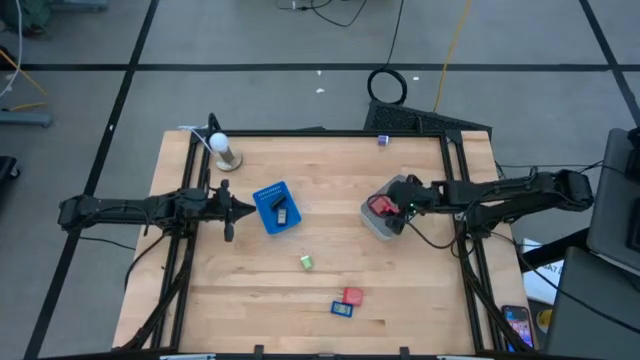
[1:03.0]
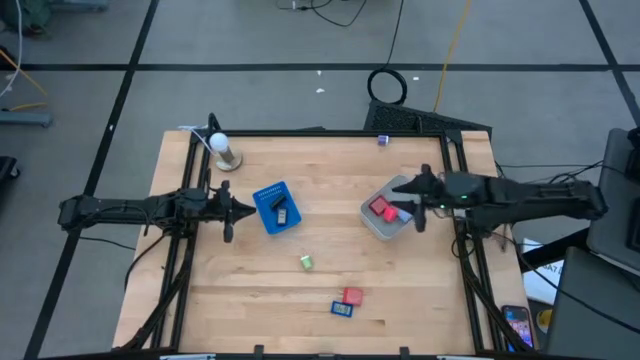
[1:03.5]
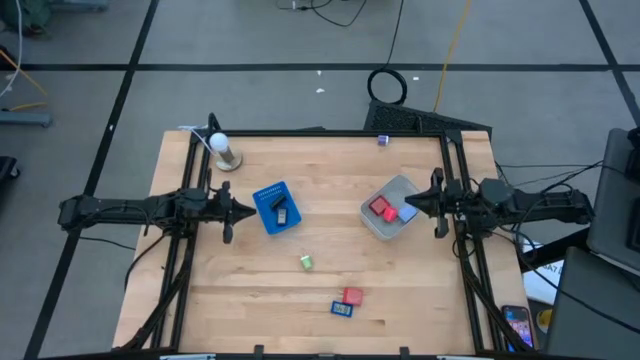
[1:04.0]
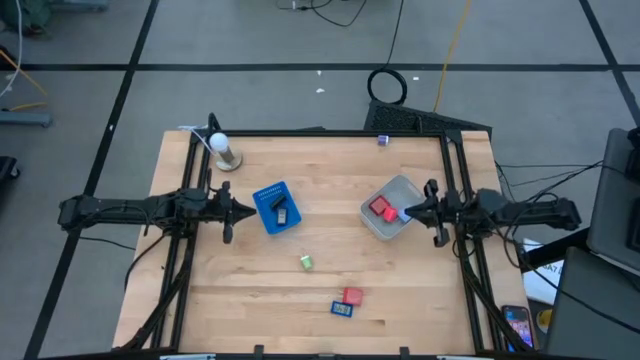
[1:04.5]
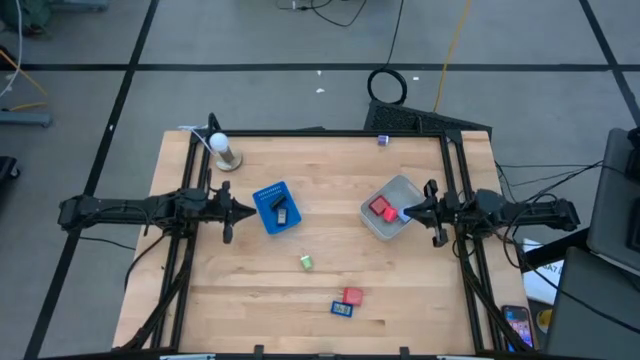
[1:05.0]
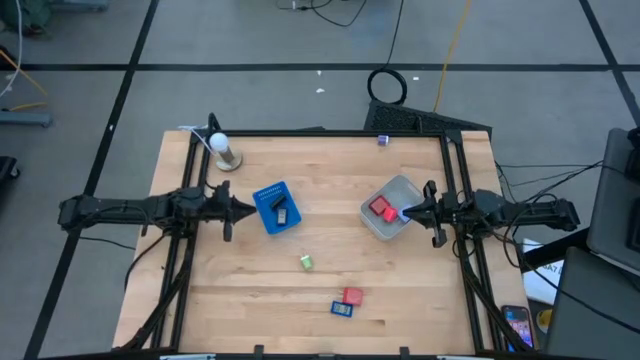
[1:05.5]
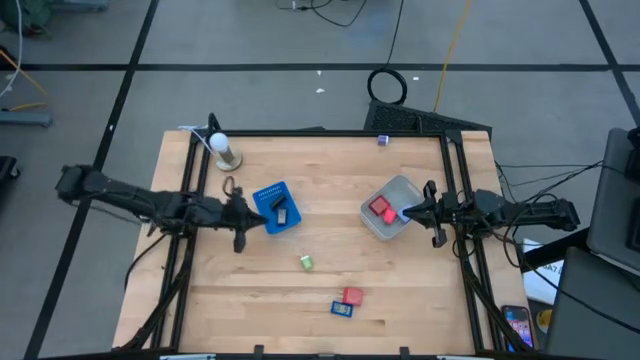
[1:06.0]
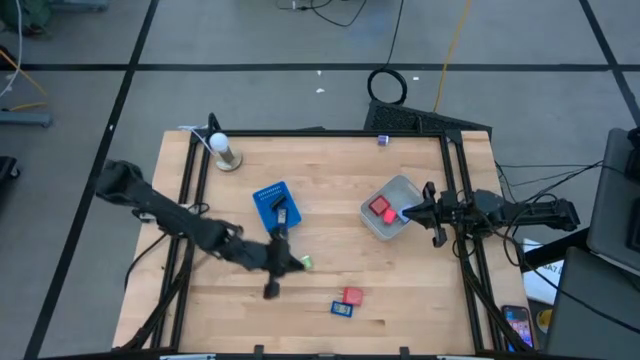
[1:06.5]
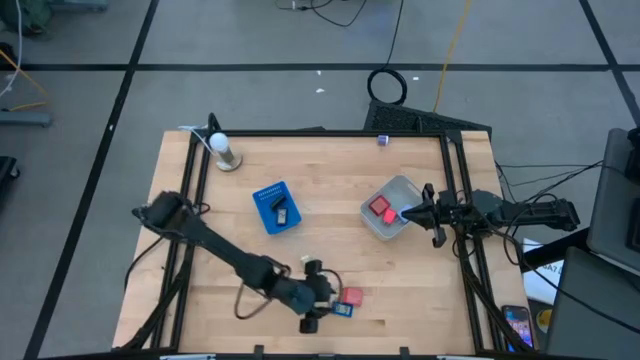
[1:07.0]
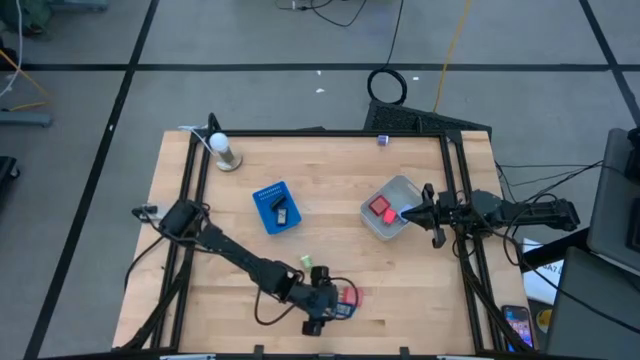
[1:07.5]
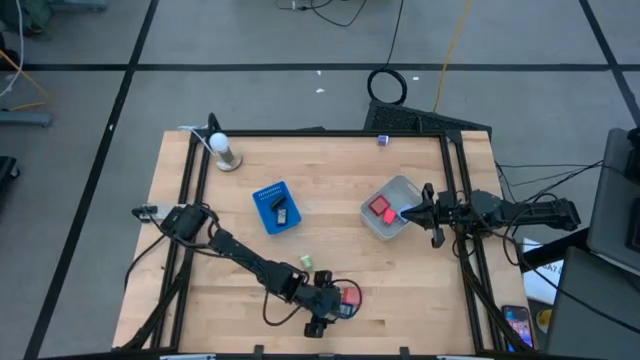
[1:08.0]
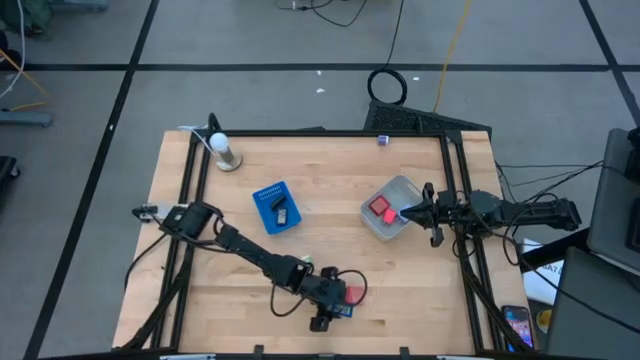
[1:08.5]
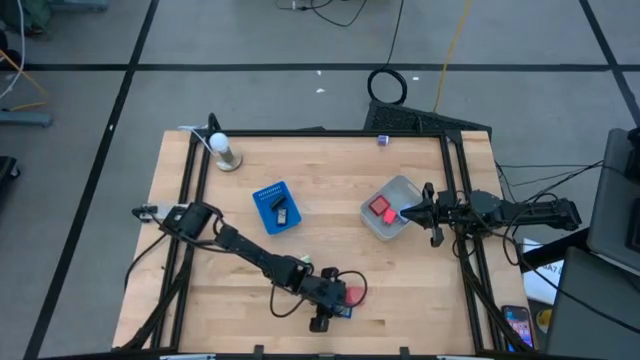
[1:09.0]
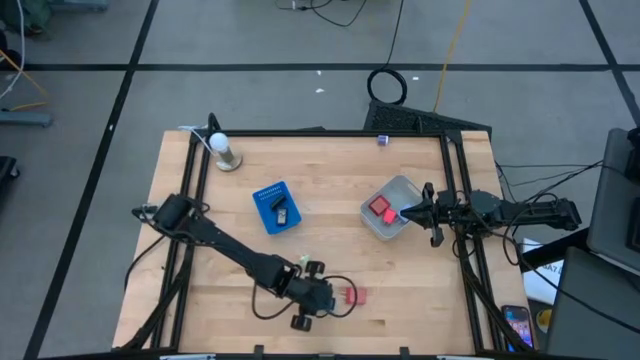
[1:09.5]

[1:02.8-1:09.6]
Task: Pick & Place Office items
Put the blue digital timer into the blue bin

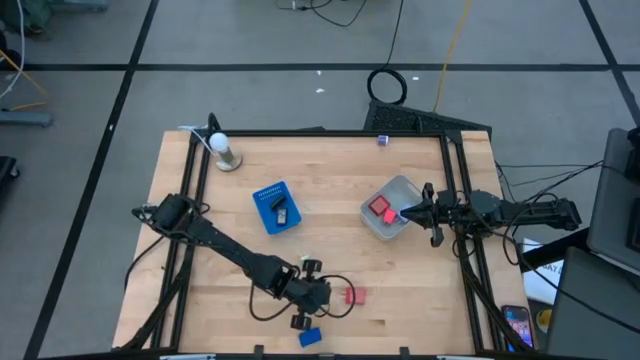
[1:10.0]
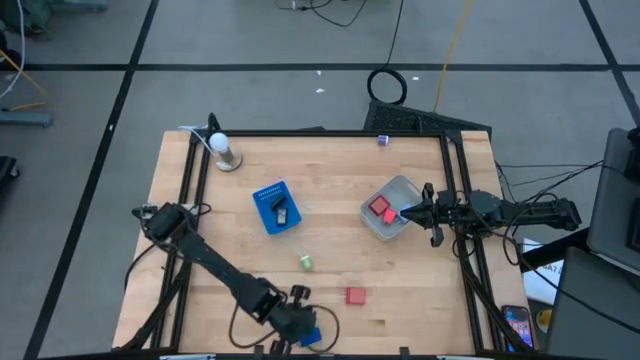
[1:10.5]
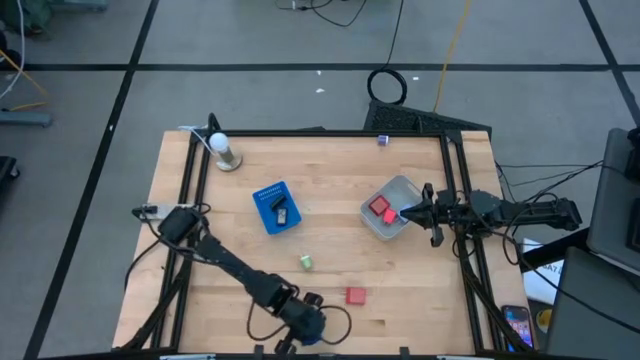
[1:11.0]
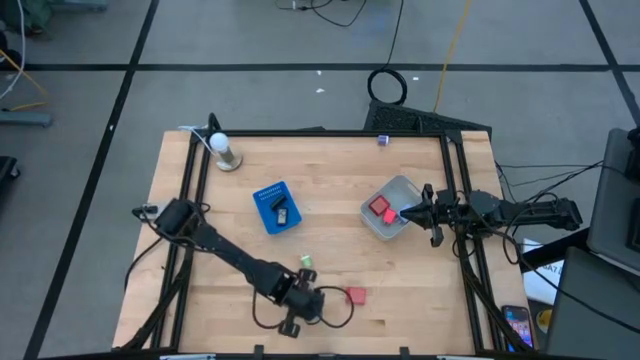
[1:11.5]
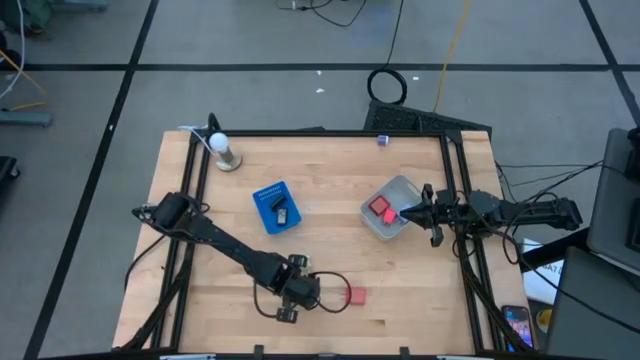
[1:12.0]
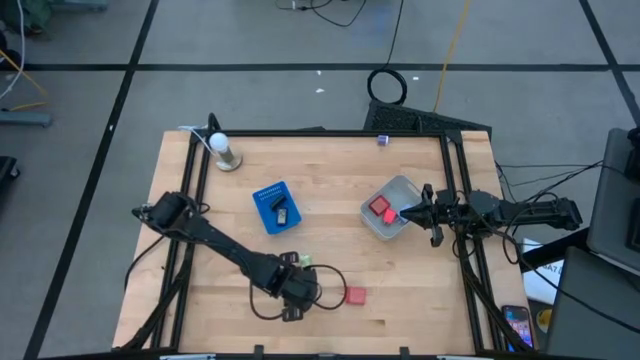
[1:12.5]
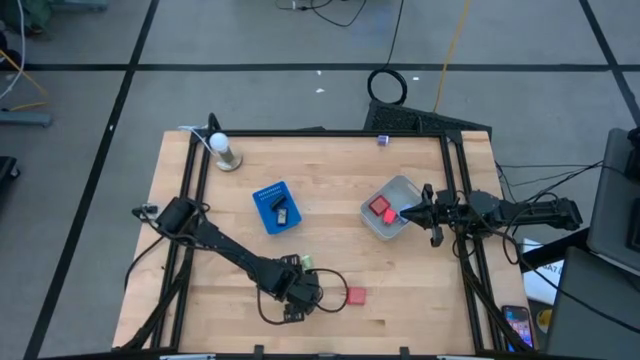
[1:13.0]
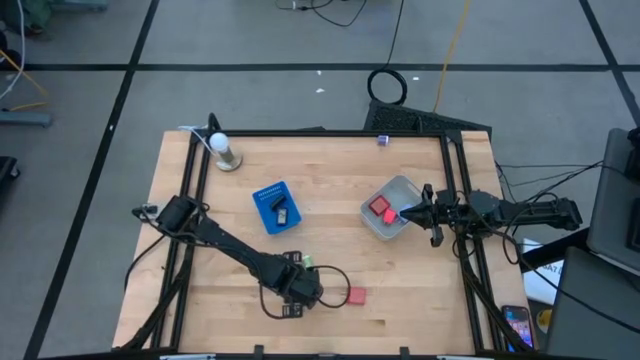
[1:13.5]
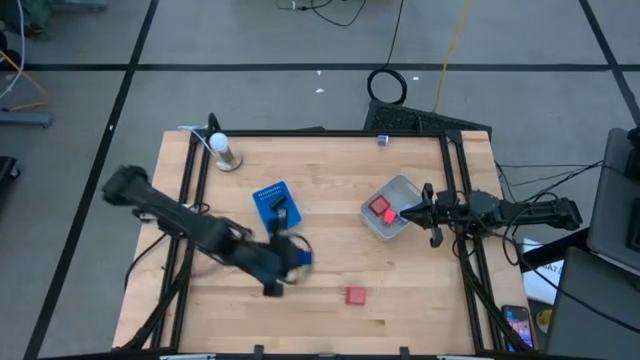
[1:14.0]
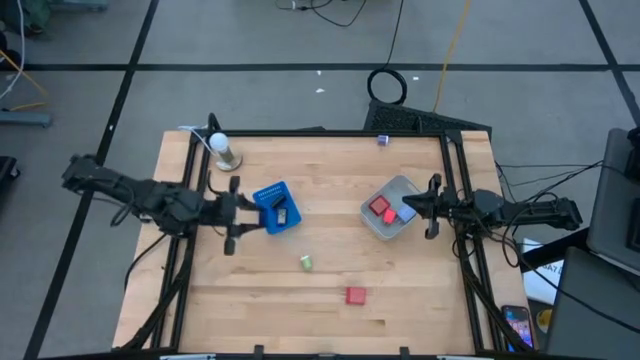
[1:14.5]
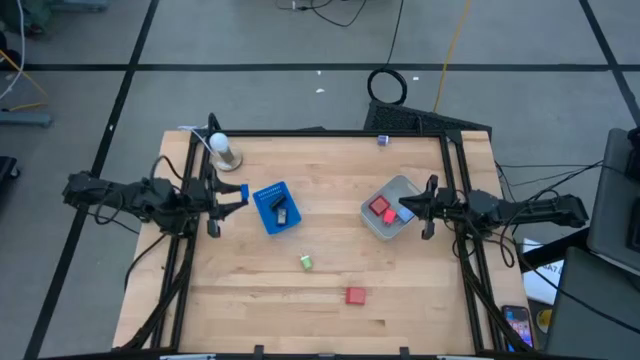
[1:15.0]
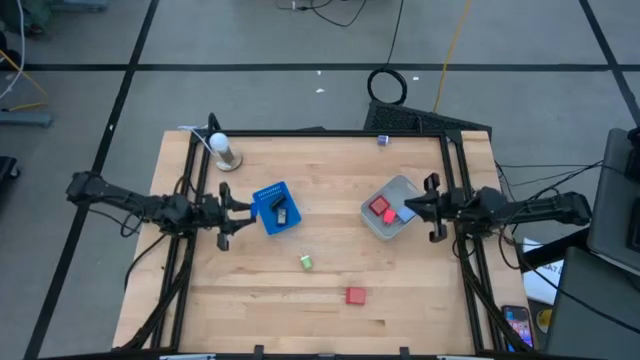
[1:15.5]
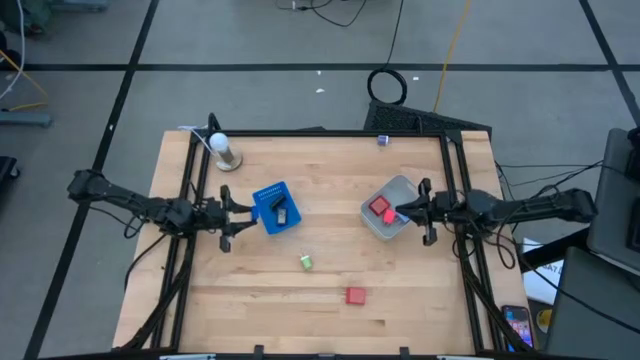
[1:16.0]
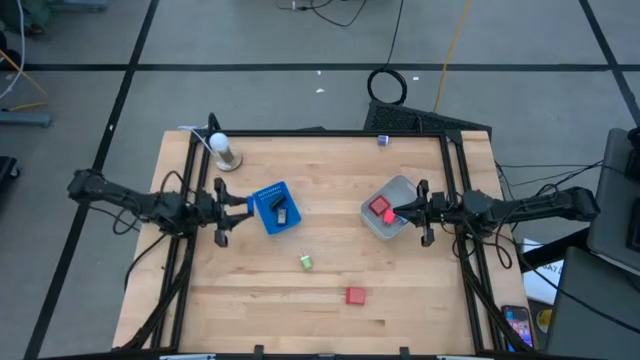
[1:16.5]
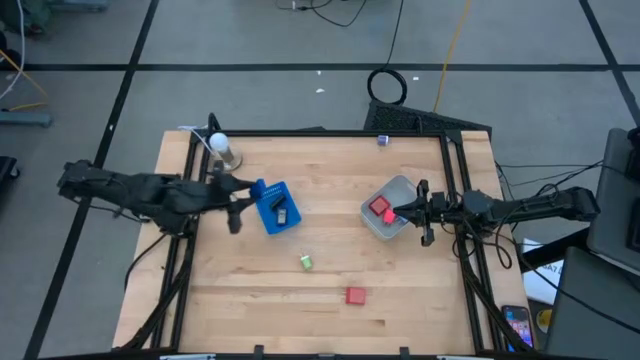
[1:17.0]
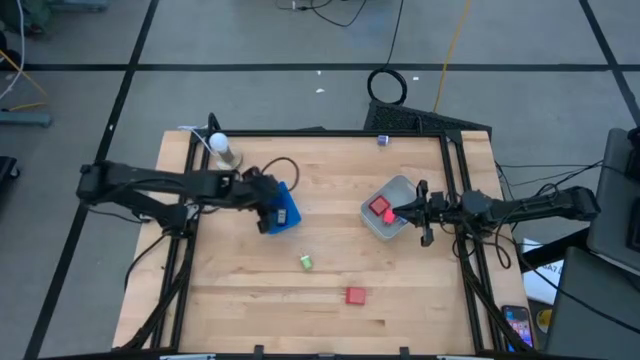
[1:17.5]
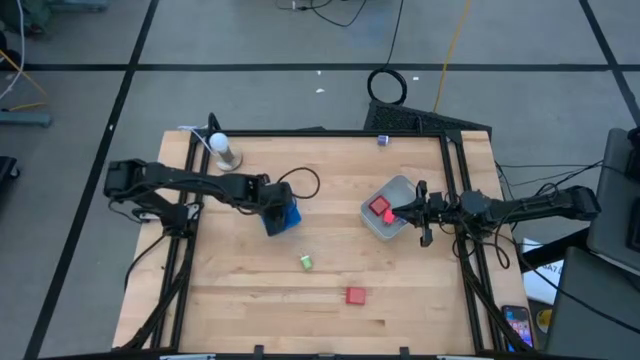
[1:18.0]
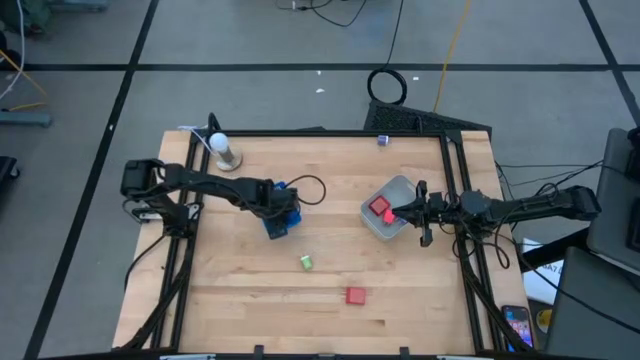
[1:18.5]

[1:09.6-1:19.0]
Put the blue digital timer into the blue bin

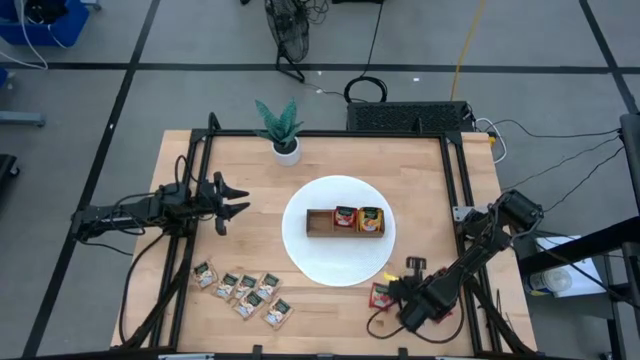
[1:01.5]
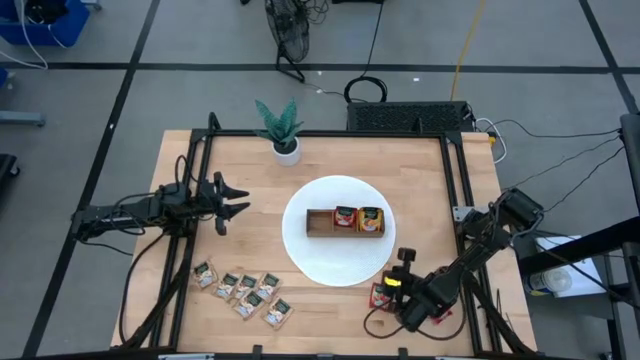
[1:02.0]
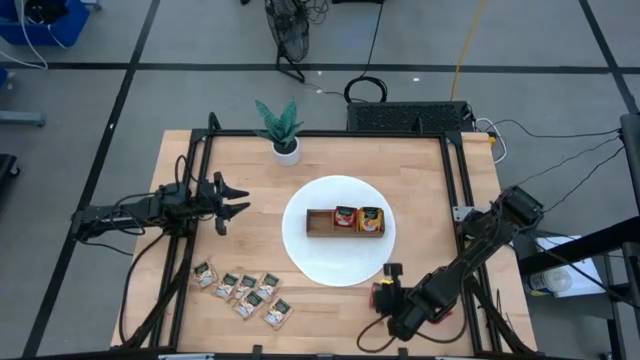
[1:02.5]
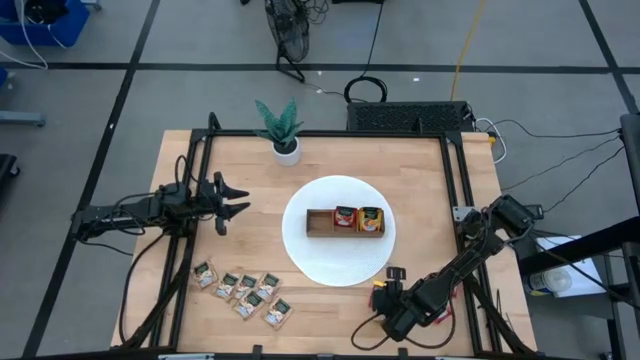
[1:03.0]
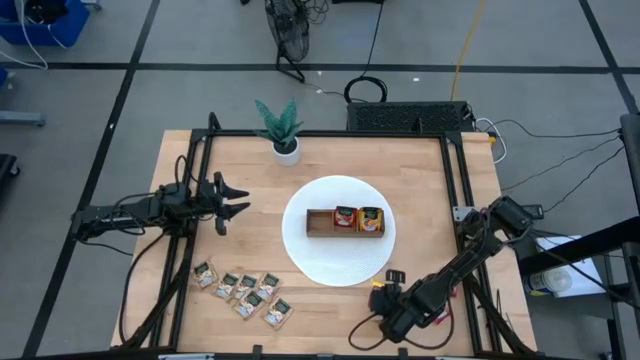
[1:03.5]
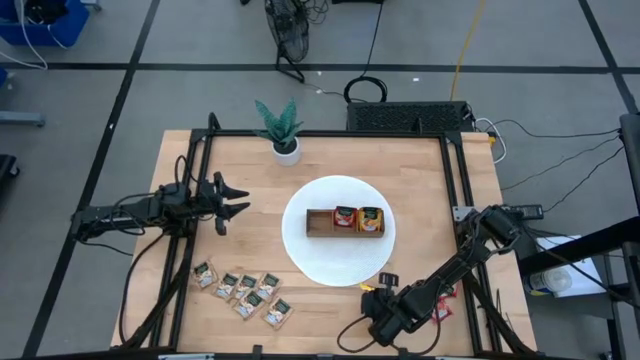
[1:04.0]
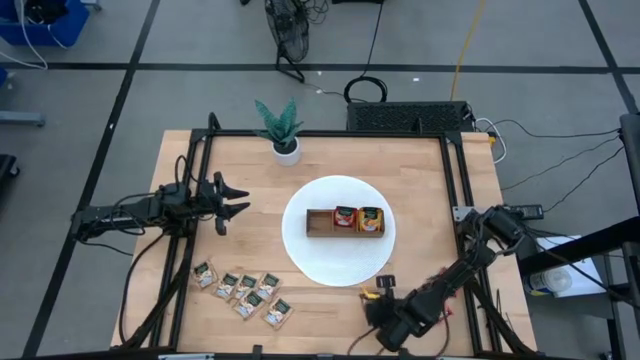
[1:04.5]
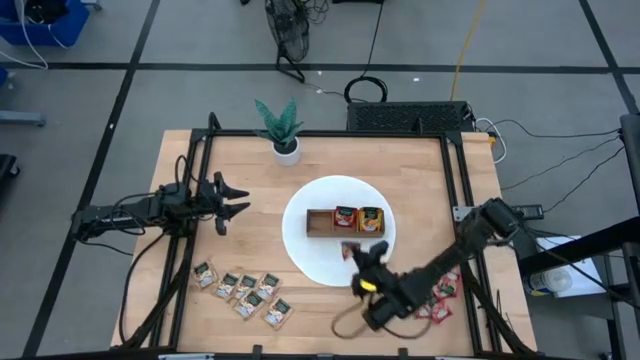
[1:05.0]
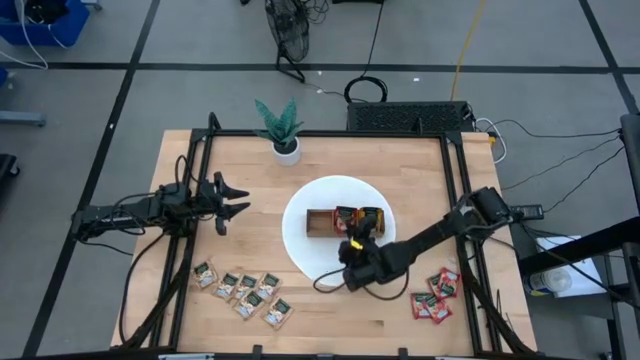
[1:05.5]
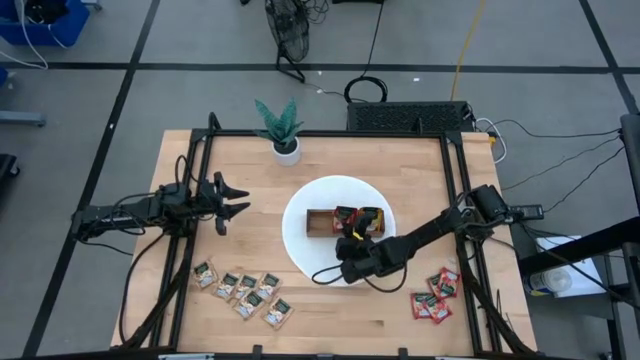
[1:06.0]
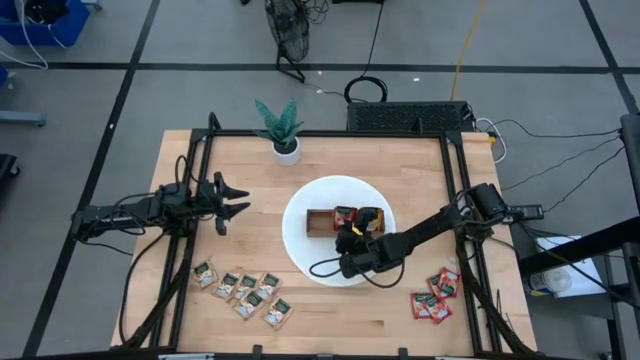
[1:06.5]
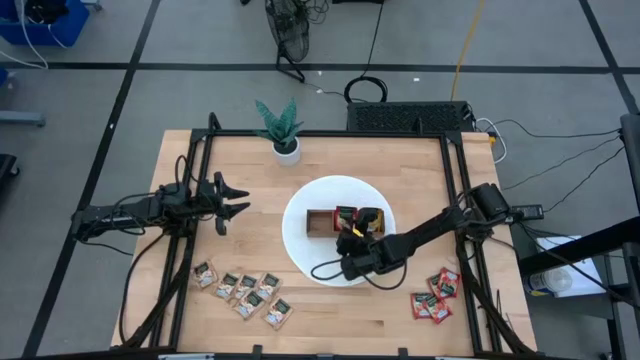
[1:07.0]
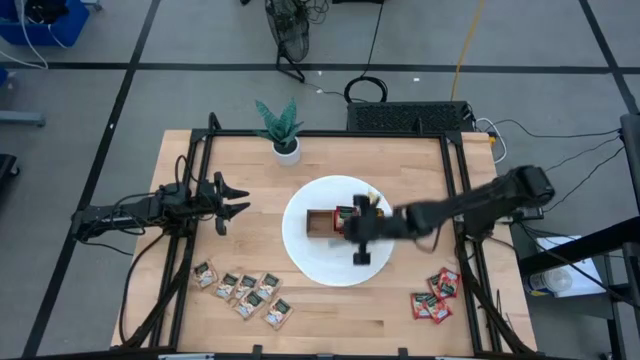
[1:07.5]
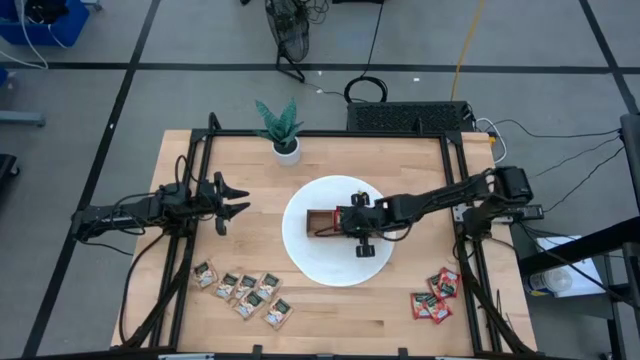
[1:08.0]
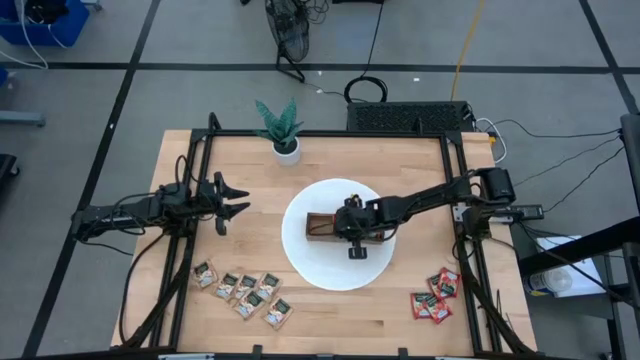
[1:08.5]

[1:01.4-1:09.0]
Task: Pick & Place Tea
Put the red tea bag into the middle section of the wooden organizer
